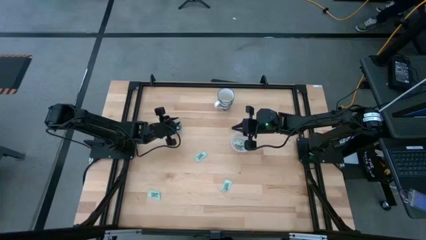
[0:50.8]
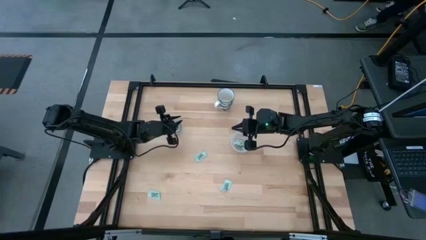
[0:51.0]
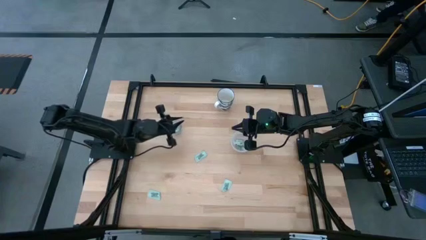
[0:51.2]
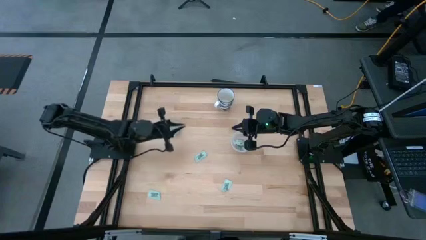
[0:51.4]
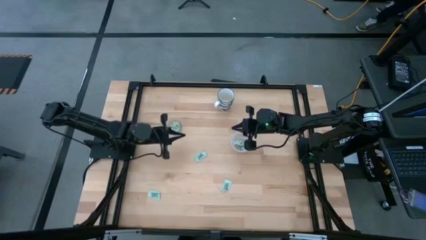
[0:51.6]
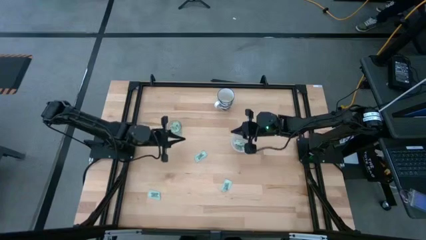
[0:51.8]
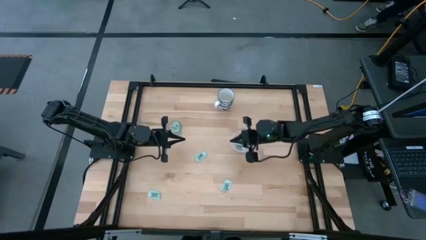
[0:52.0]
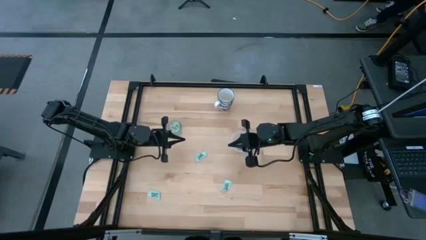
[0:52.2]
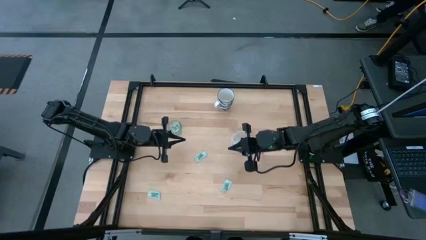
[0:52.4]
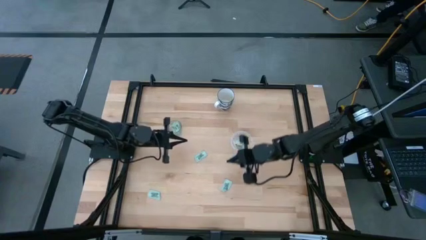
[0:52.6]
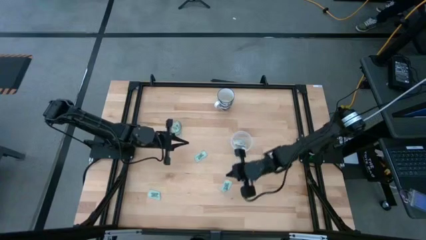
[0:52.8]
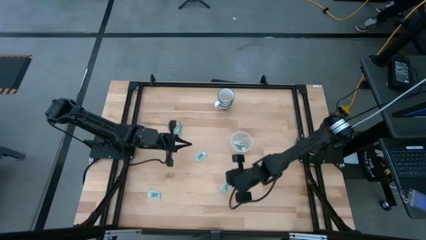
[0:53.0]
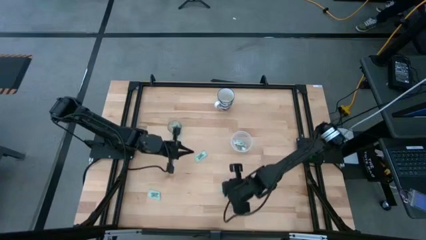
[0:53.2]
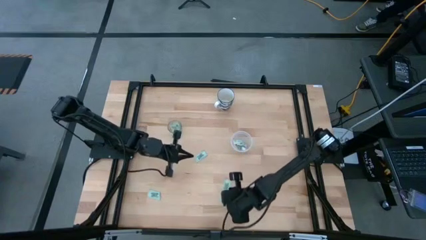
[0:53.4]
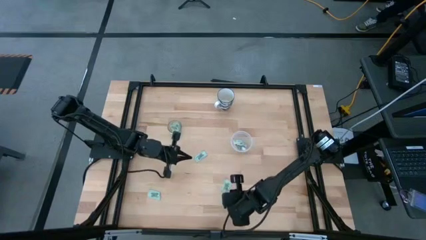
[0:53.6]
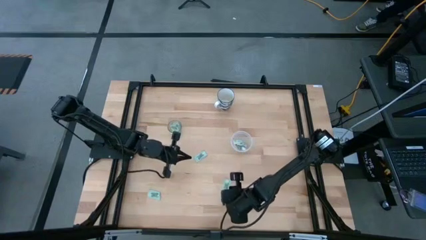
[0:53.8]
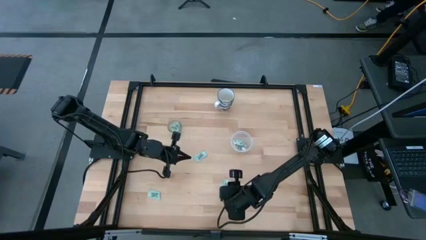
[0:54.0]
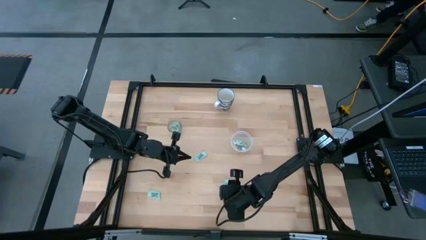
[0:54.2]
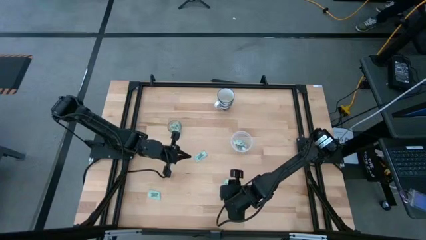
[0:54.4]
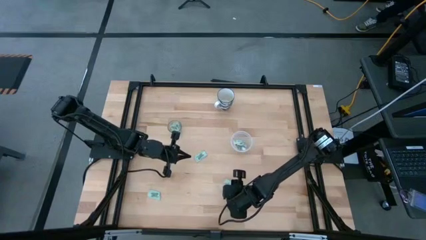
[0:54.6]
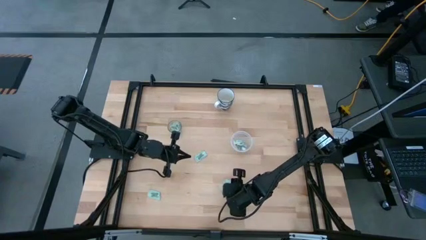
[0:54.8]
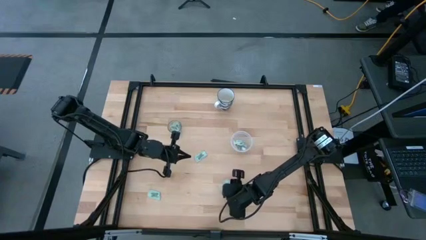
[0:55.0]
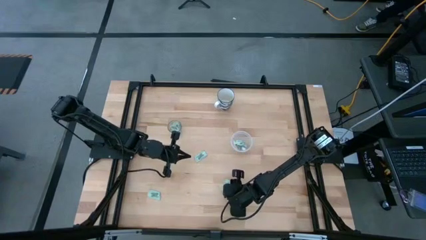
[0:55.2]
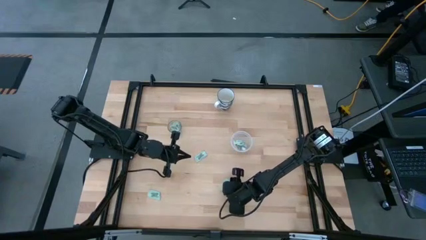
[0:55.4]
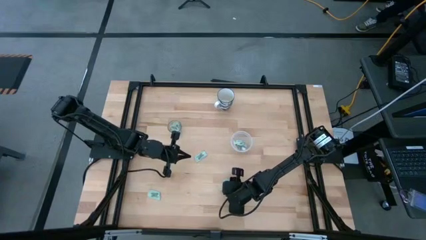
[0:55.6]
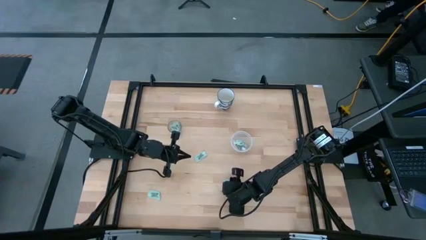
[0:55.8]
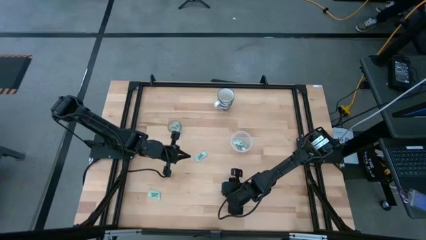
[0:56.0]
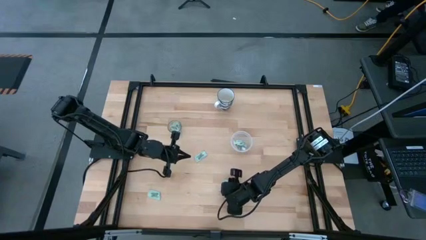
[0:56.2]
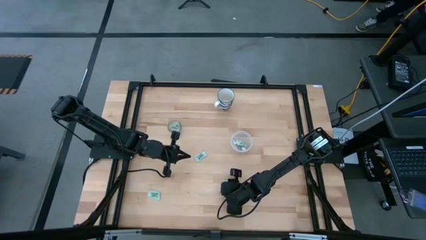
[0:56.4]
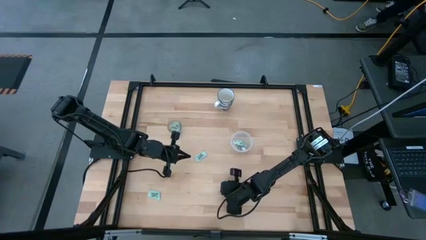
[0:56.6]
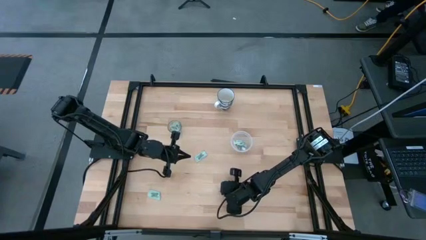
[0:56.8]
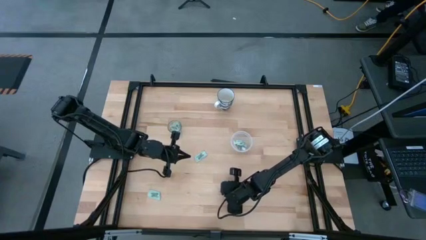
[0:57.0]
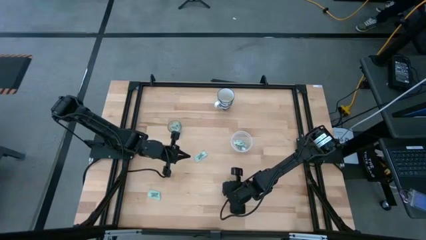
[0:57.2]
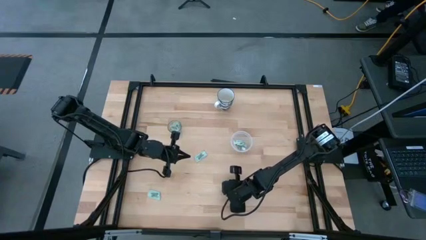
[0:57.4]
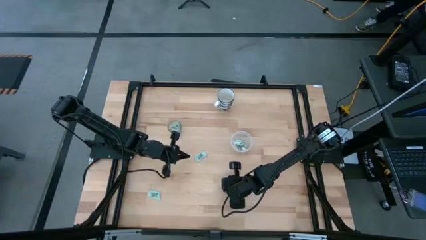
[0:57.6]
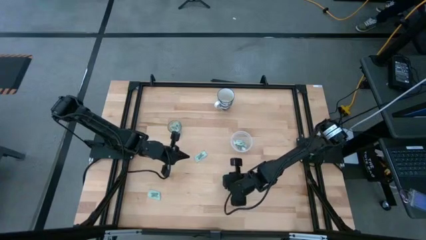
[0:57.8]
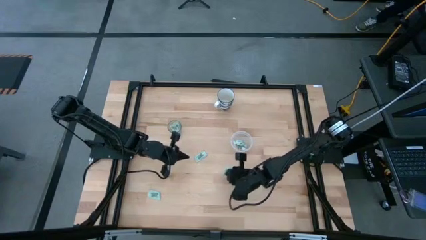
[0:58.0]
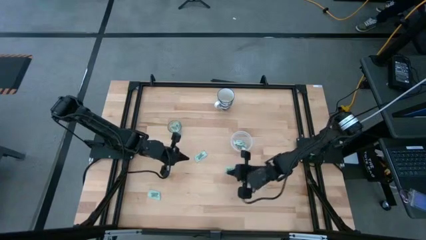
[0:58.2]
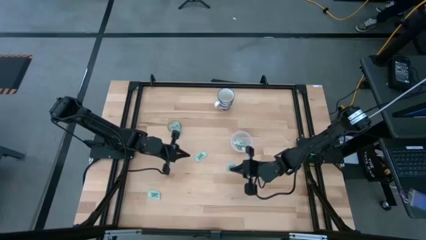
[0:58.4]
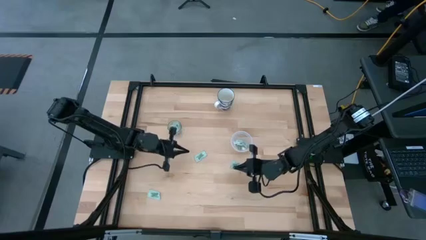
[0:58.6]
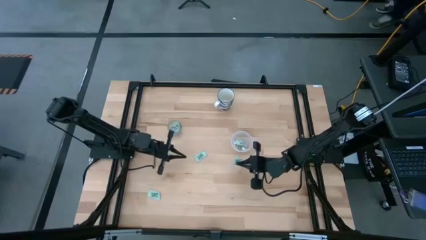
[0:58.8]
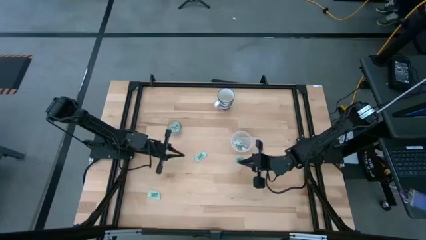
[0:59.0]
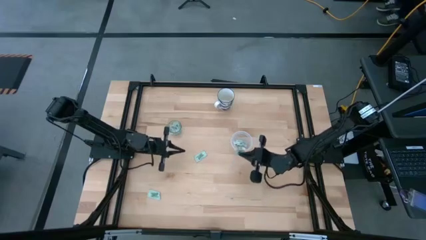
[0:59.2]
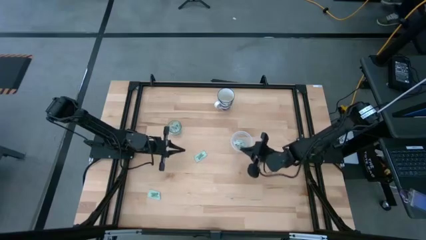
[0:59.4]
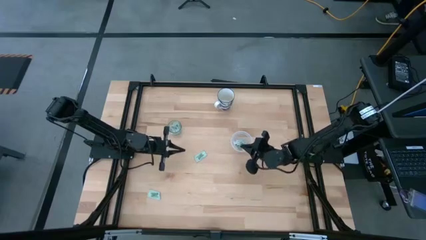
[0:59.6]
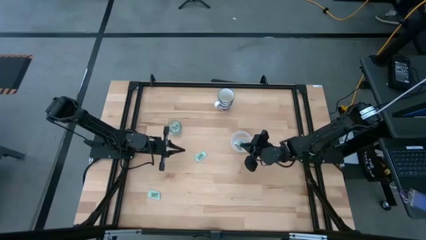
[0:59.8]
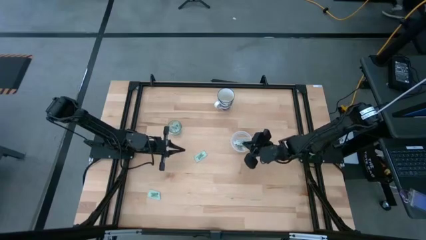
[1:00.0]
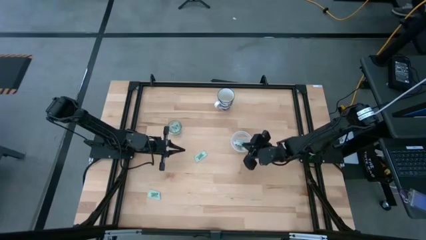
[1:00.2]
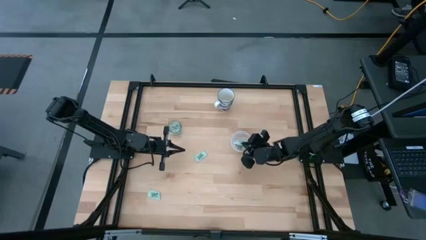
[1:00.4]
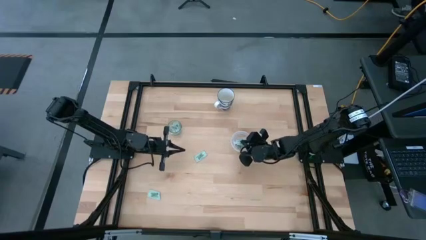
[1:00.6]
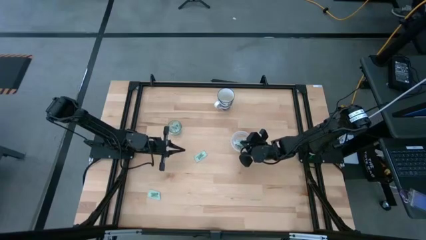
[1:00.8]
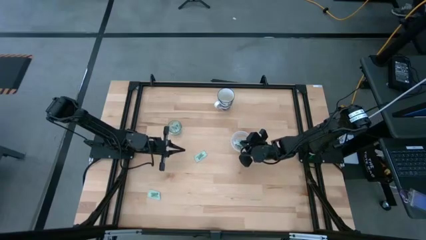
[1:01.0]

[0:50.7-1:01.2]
Task: Pick and place Stevia / Truvia into bins
Put the stevia packet into the transparent container
